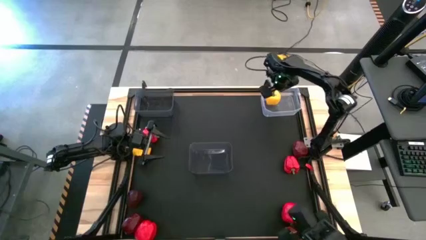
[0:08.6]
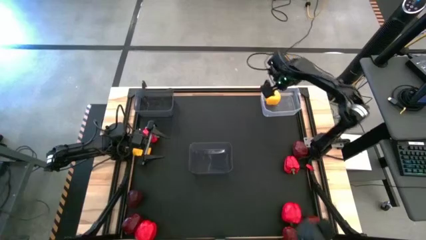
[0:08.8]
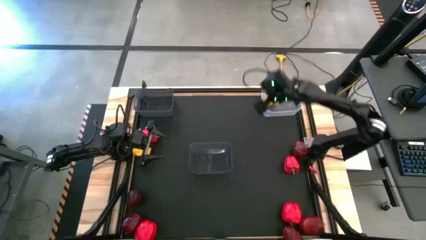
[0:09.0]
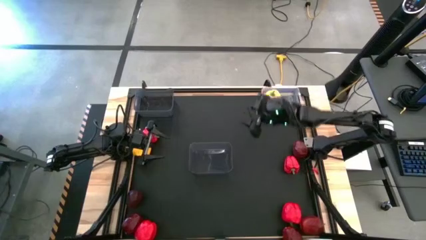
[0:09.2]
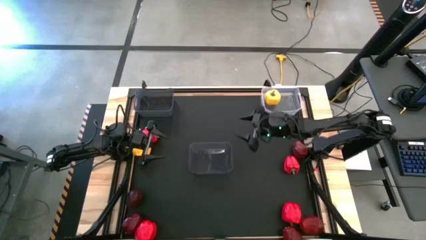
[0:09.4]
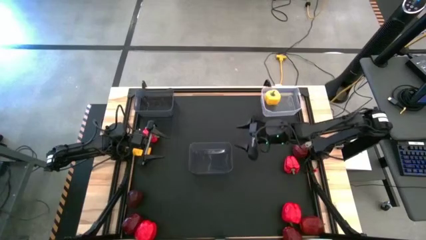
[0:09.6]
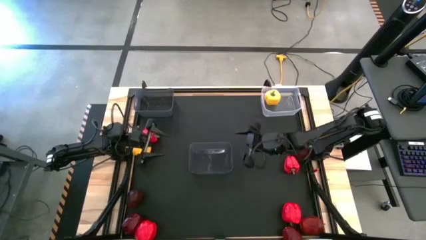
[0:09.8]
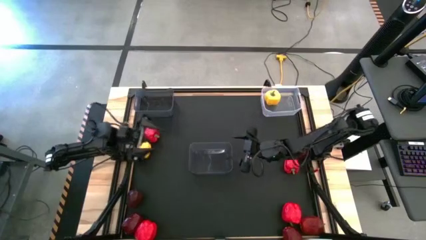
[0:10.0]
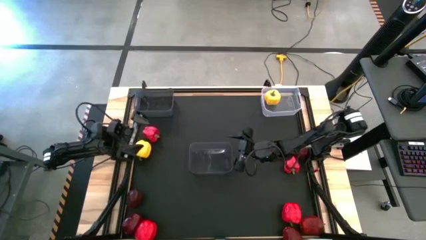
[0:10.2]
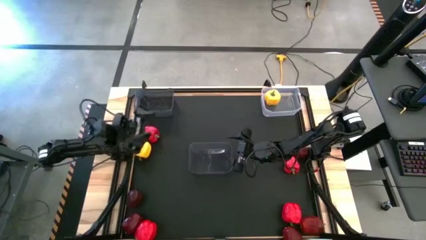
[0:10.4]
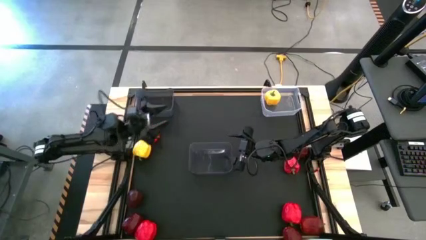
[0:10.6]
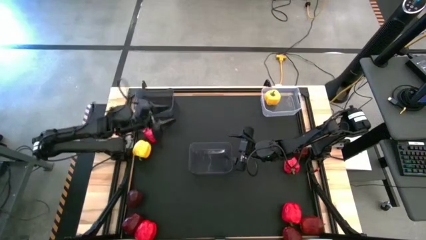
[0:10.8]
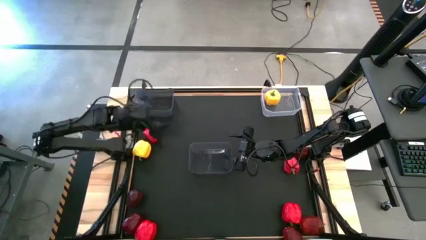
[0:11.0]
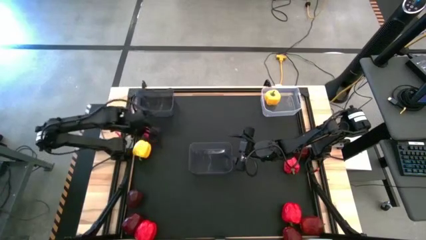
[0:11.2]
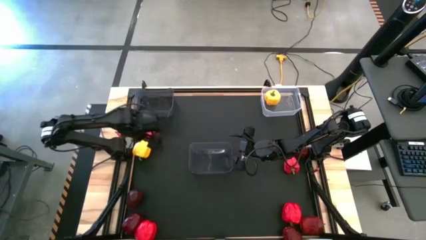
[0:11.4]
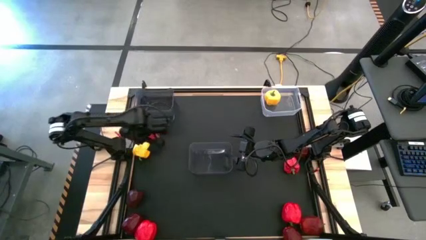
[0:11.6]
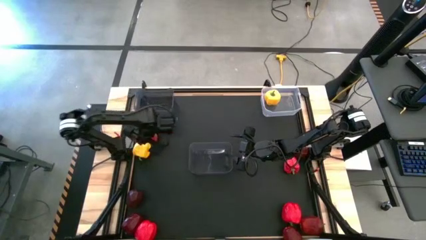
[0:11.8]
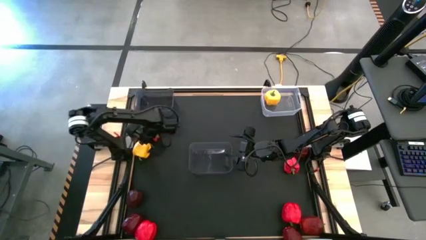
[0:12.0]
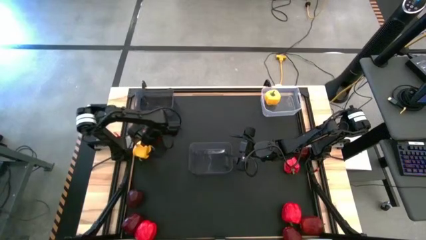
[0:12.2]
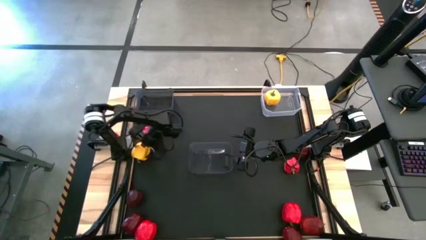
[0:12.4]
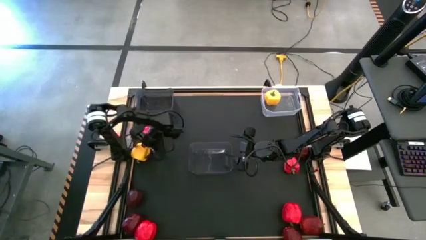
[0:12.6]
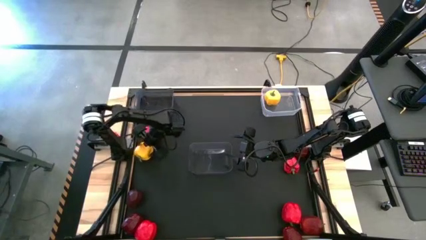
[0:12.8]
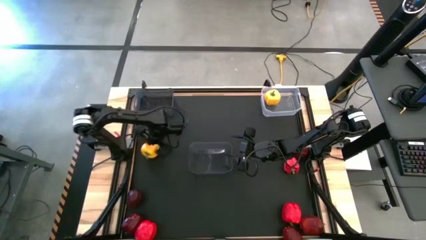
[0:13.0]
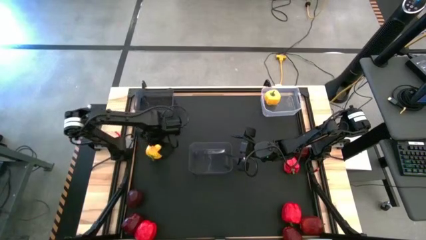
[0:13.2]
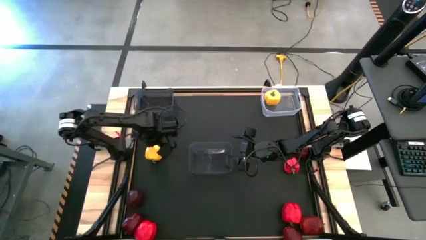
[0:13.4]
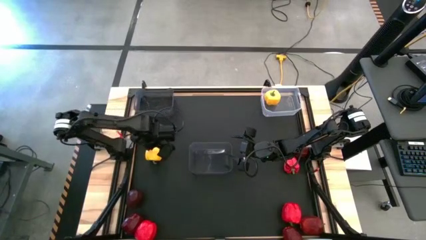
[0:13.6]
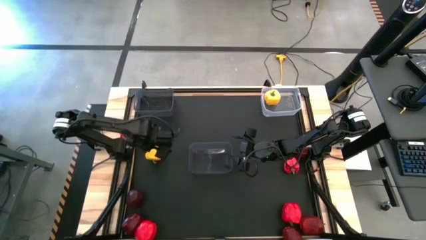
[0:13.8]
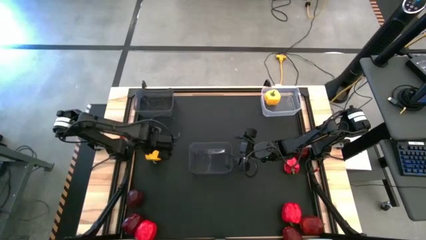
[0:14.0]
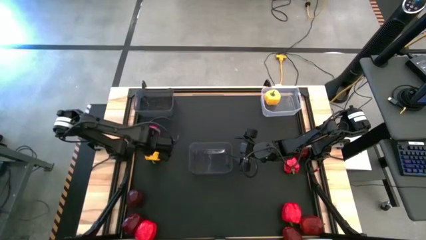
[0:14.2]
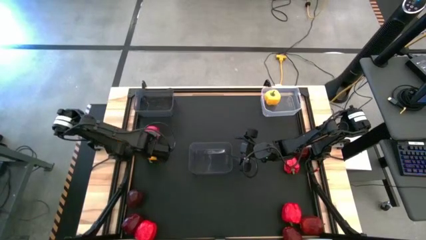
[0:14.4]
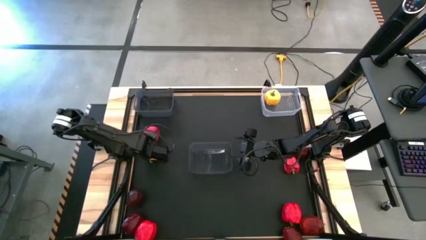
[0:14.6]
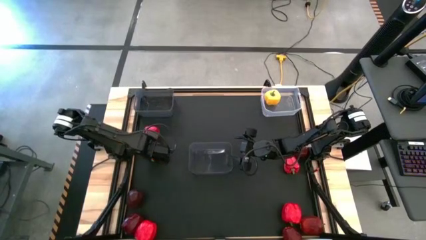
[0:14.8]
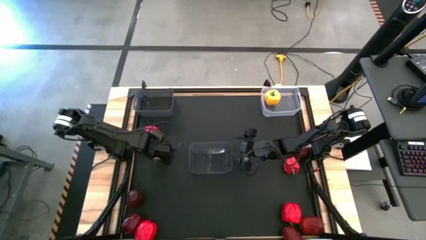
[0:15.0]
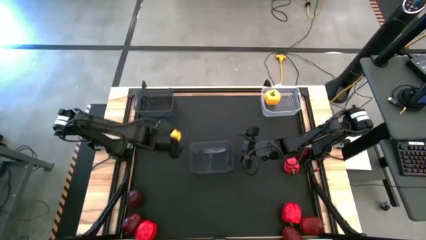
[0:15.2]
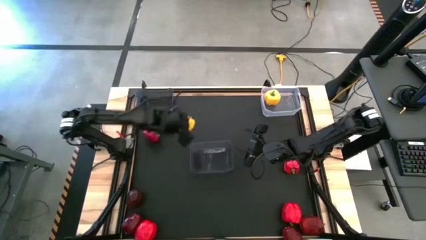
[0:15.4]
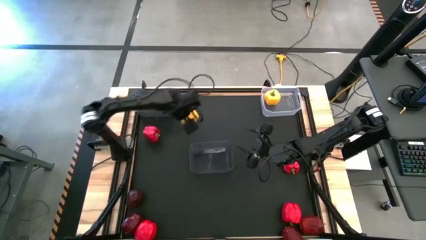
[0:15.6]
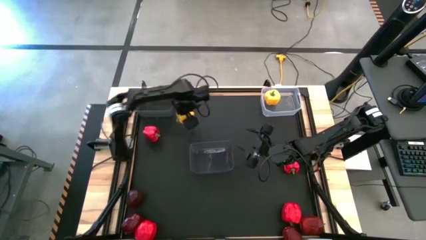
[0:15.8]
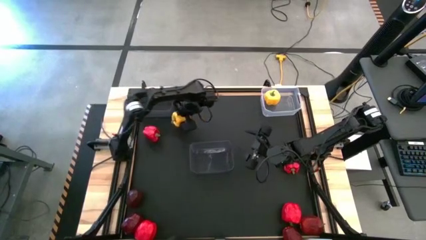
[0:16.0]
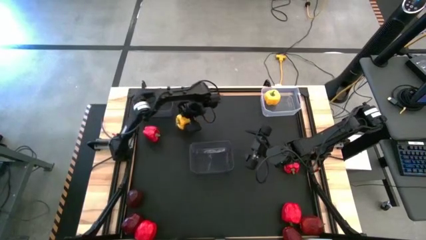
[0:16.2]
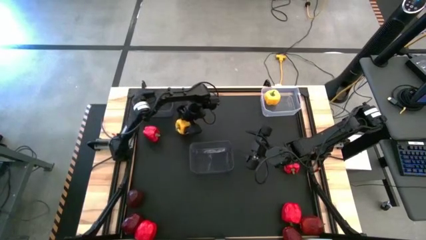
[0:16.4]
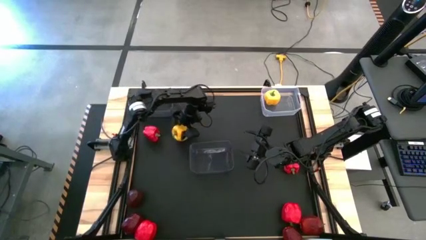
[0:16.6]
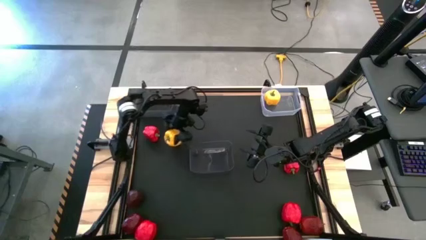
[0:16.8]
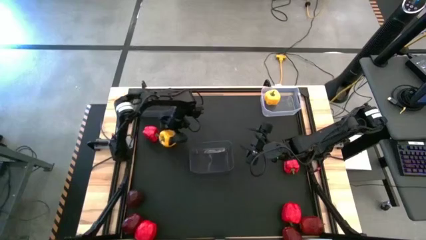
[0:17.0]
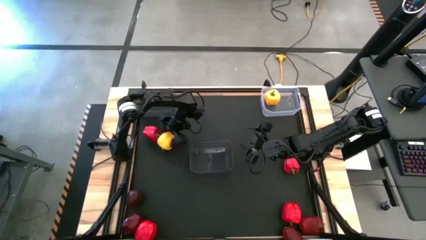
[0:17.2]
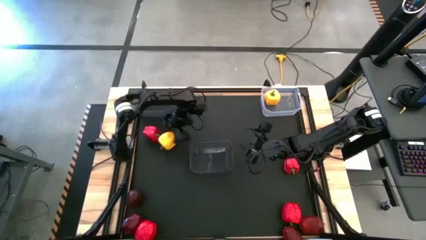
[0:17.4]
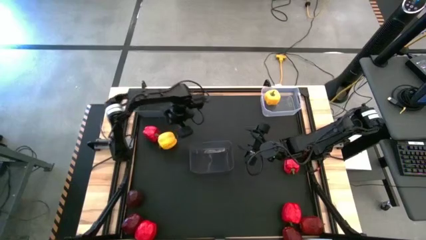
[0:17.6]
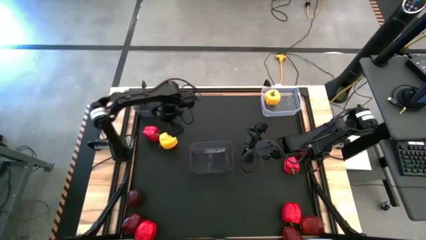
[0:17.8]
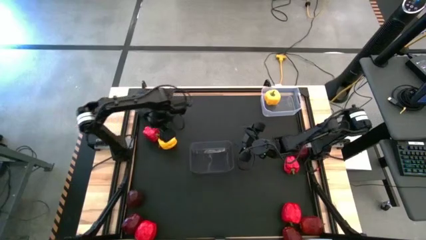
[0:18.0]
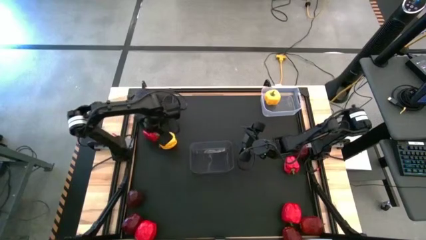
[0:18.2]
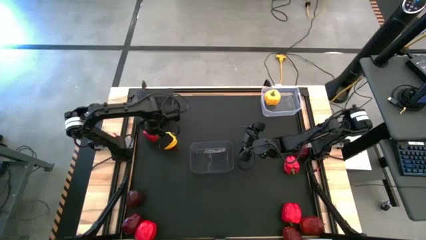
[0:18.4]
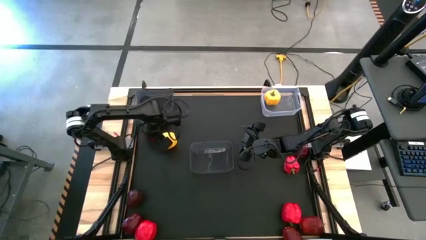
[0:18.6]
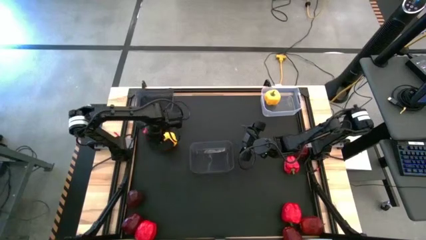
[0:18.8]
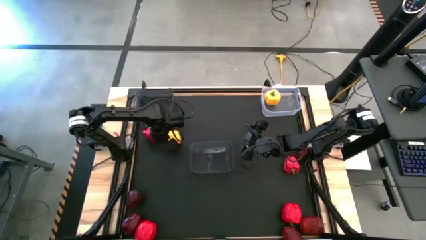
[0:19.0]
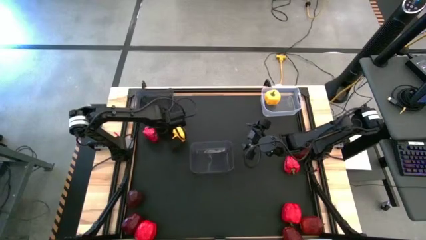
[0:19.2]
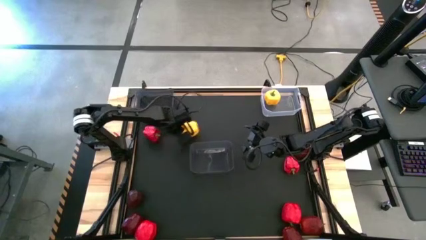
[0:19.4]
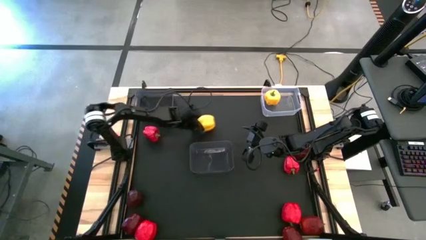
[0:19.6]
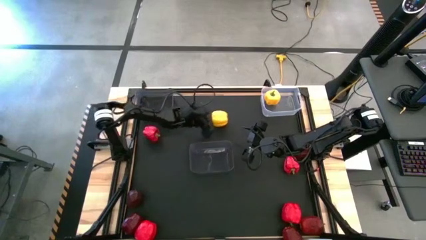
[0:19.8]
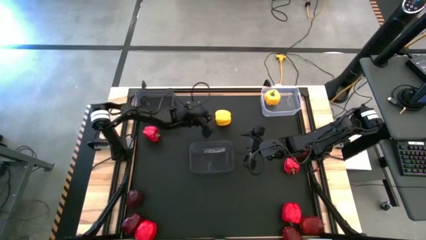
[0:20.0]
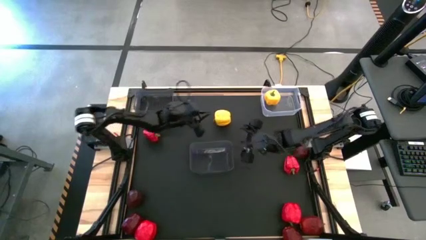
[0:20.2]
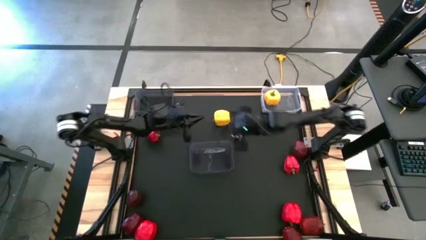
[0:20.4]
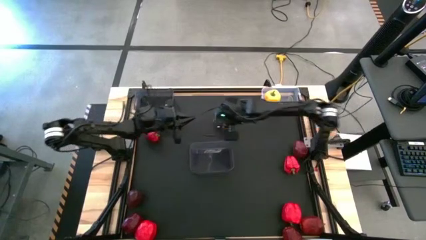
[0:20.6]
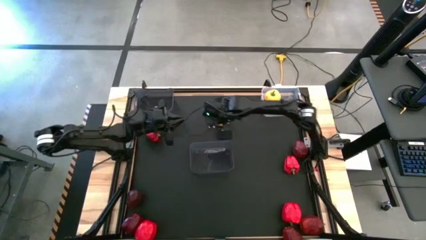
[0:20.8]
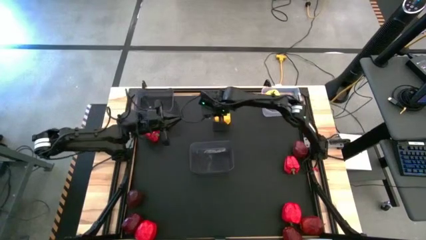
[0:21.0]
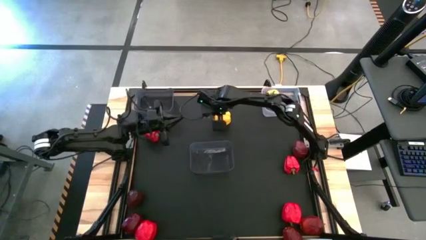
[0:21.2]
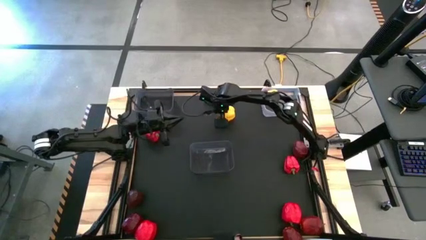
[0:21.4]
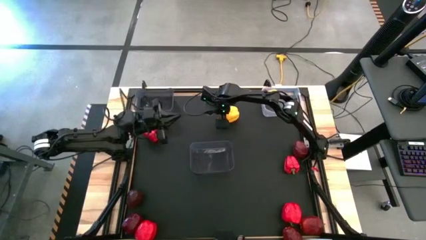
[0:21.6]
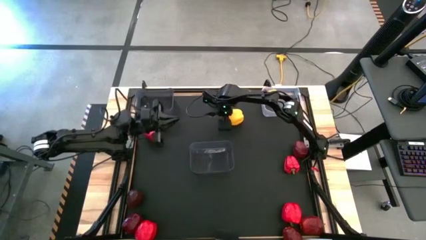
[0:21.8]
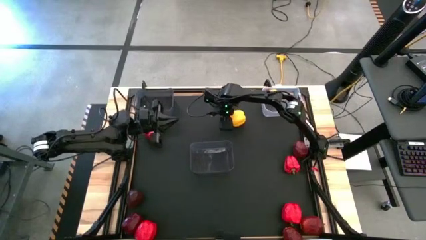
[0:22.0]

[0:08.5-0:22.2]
Task: Sort produce into baskets
Put the yellow bell pepper into the transparent bin

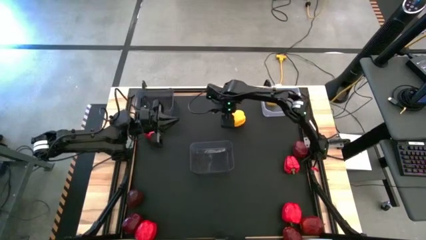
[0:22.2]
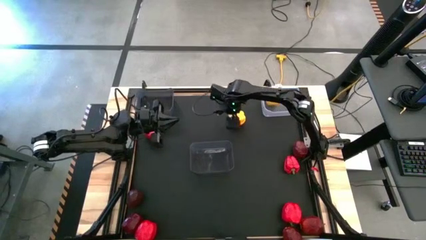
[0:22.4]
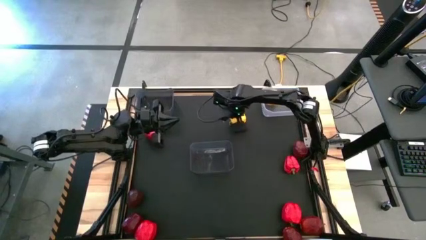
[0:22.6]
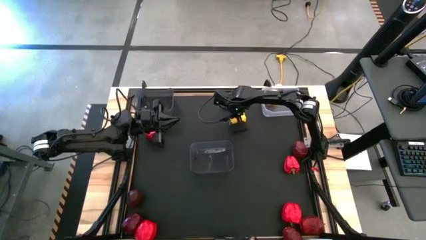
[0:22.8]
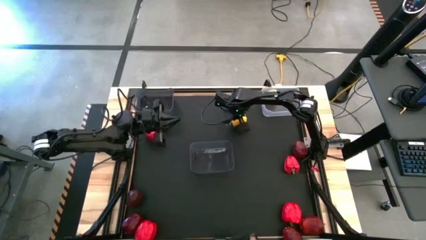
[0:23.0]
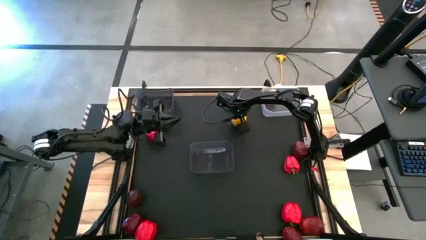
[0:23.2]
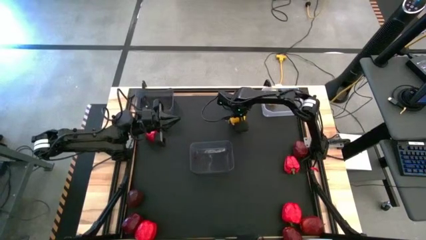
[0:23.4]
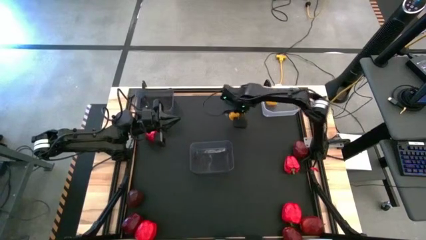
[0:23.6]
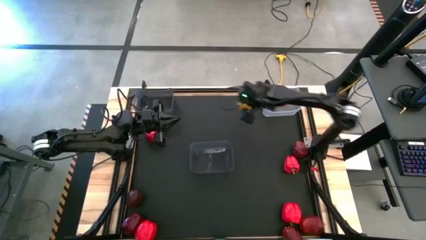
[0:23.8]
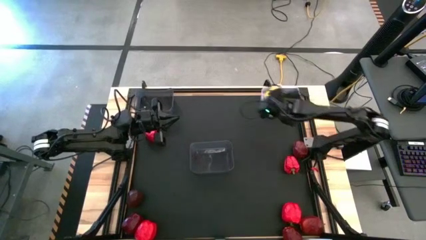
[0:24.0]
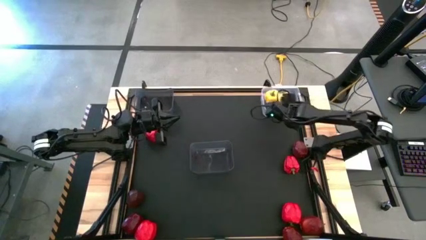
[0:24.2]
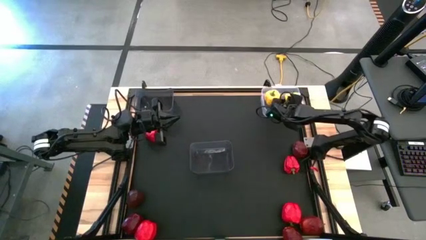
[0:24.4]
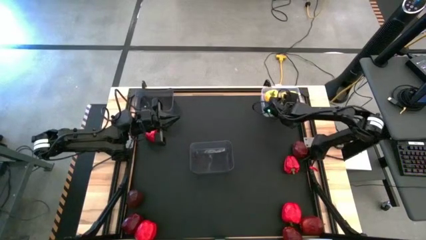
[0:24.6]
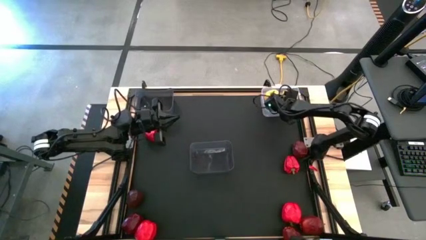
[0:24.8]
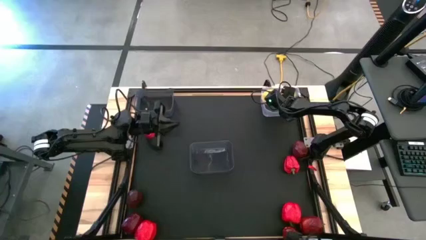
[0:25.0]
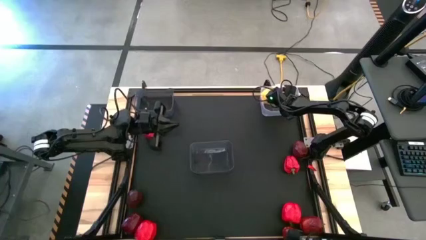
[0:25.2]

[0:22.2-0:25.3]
Put the yellow bell pepper into the transparent bin
